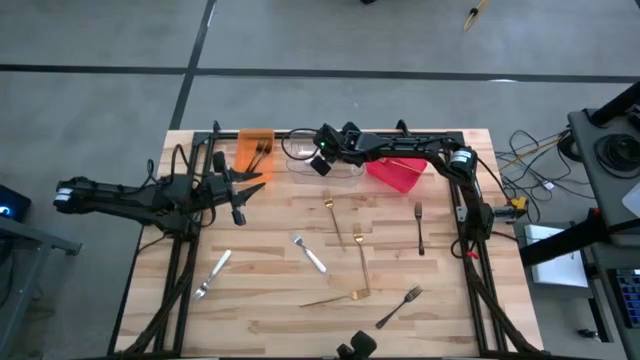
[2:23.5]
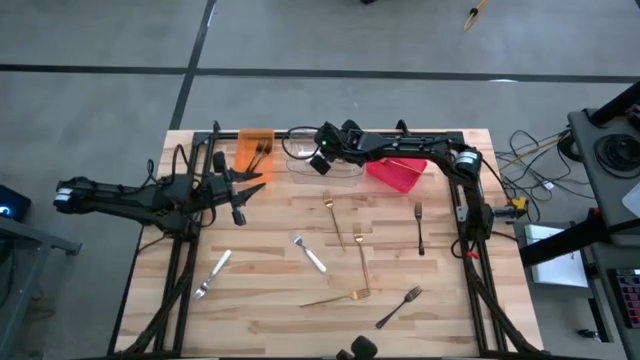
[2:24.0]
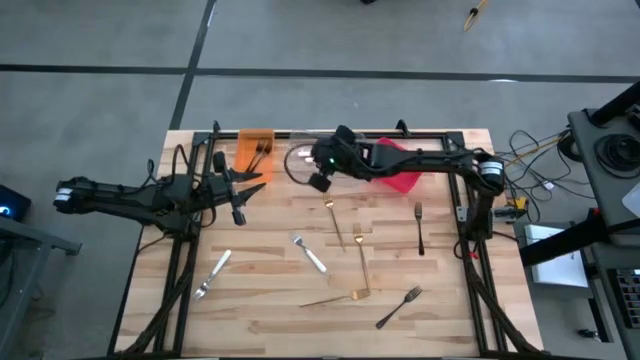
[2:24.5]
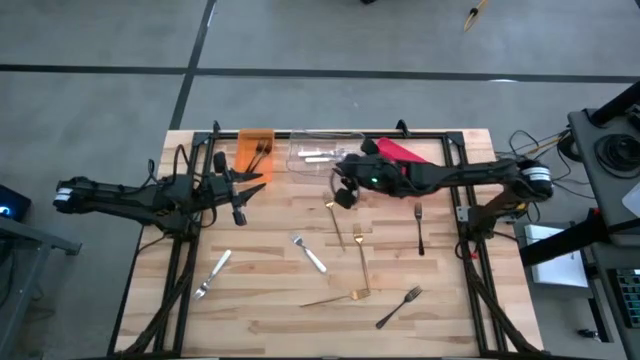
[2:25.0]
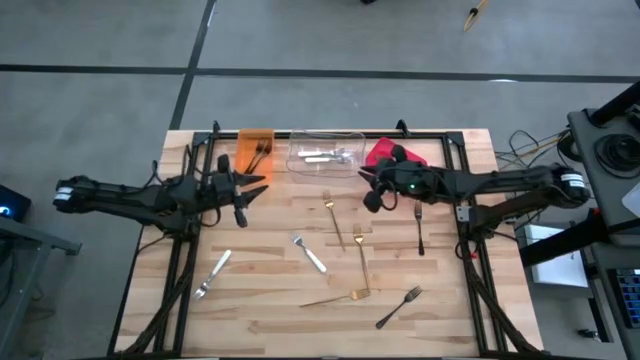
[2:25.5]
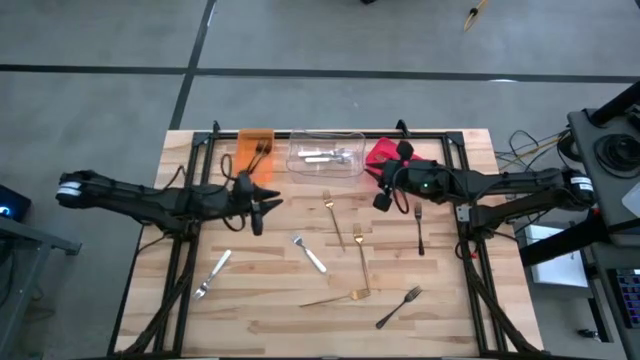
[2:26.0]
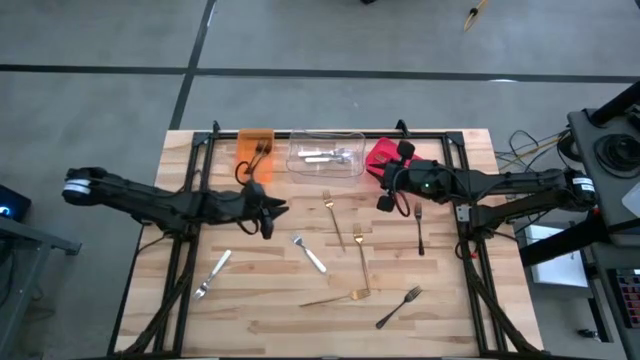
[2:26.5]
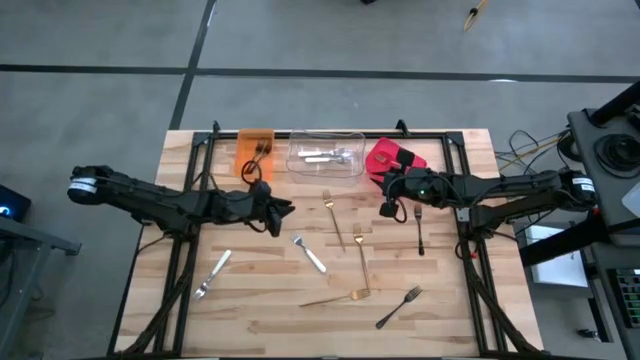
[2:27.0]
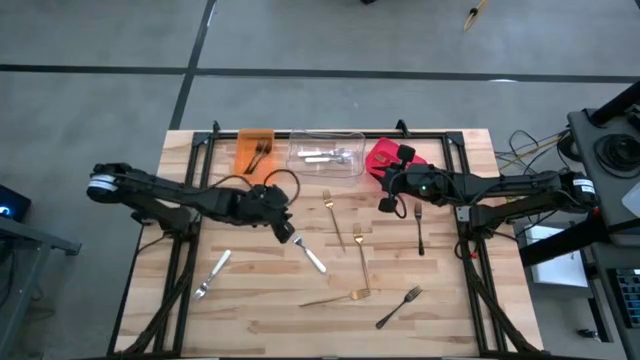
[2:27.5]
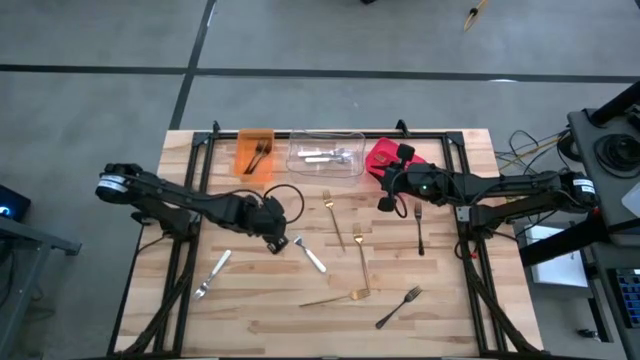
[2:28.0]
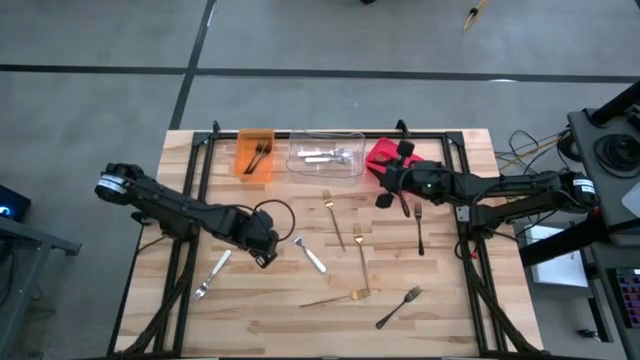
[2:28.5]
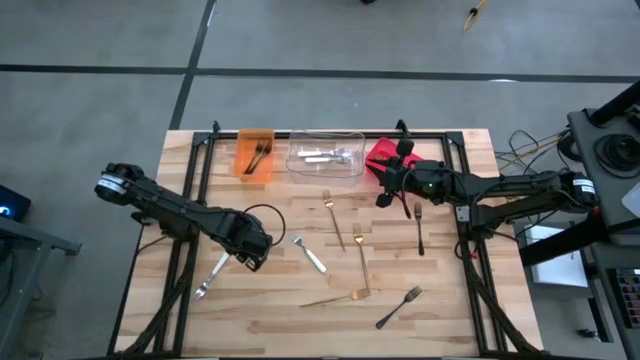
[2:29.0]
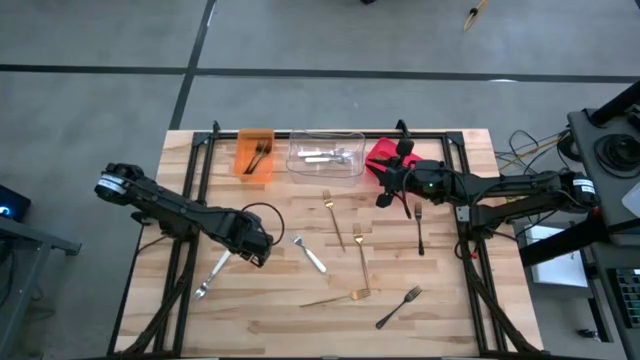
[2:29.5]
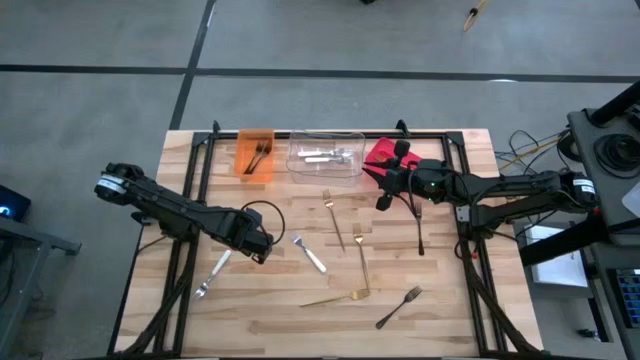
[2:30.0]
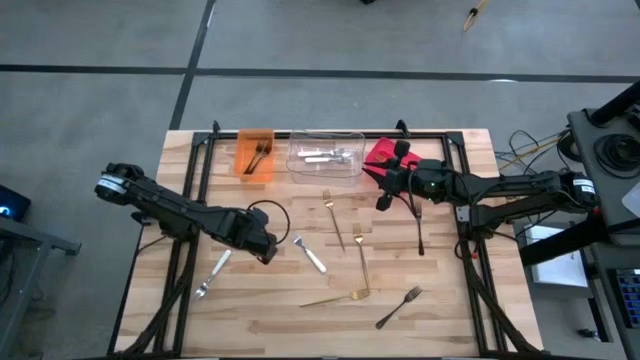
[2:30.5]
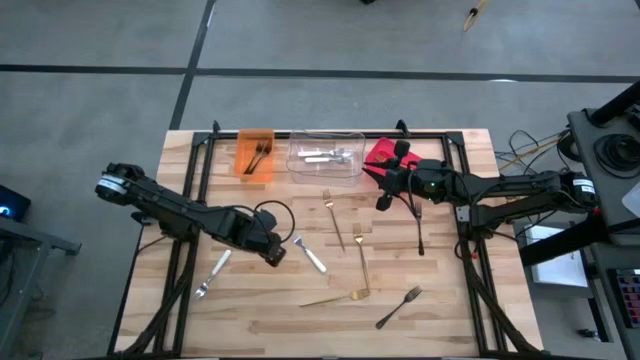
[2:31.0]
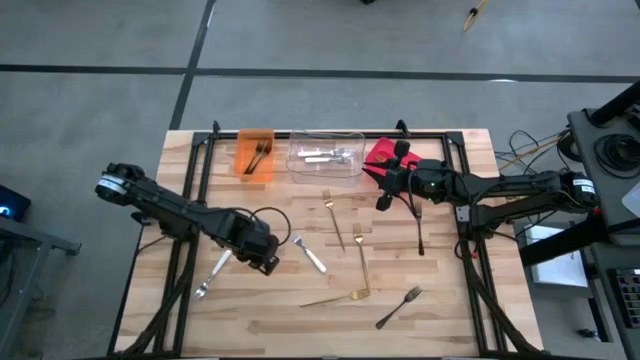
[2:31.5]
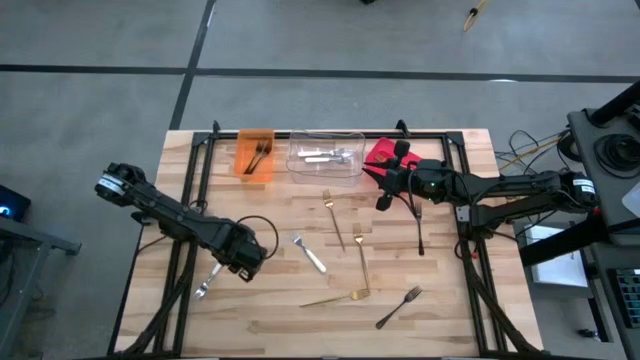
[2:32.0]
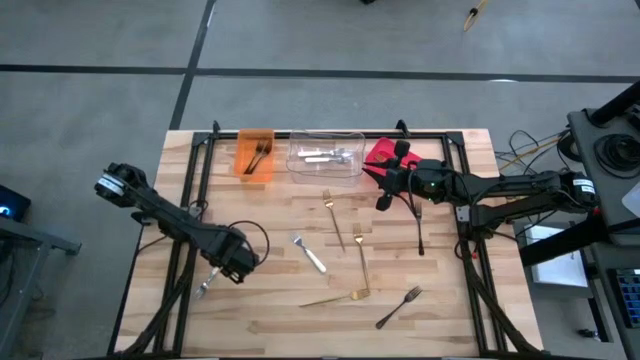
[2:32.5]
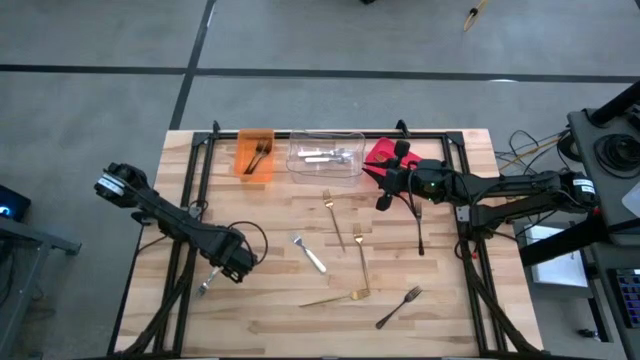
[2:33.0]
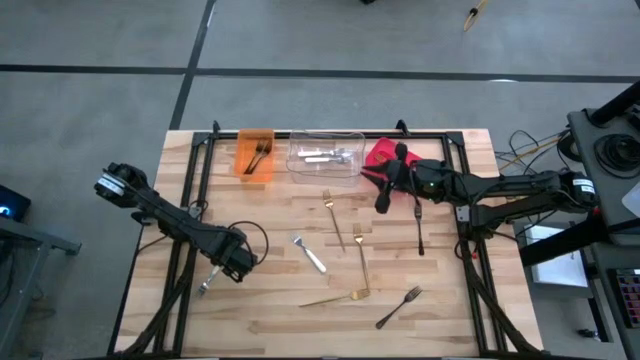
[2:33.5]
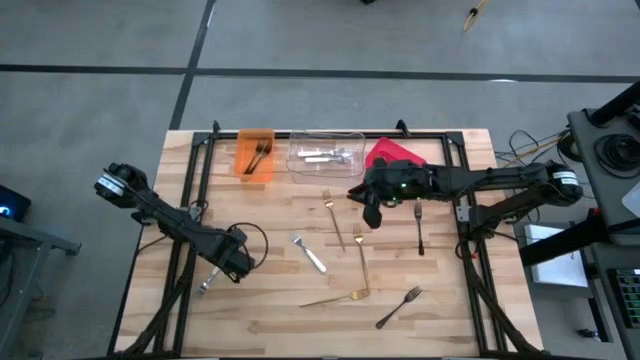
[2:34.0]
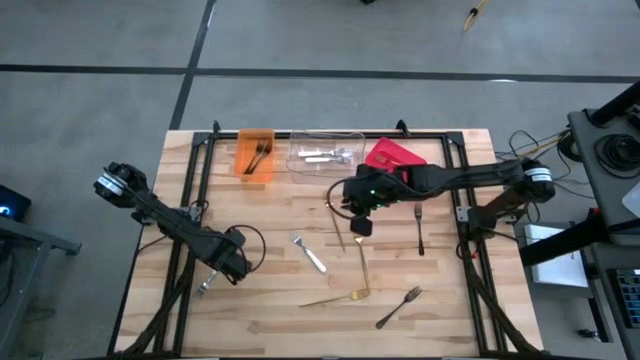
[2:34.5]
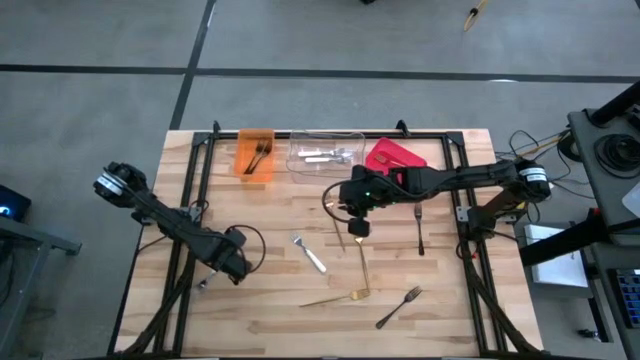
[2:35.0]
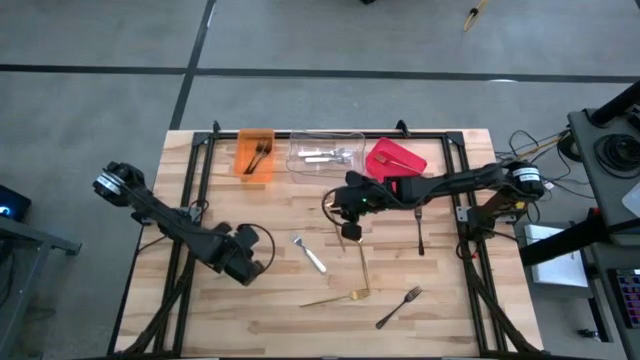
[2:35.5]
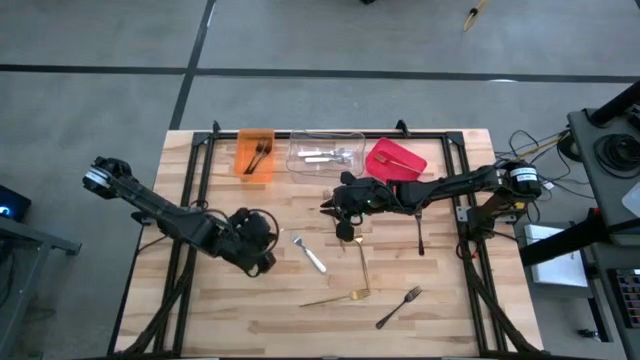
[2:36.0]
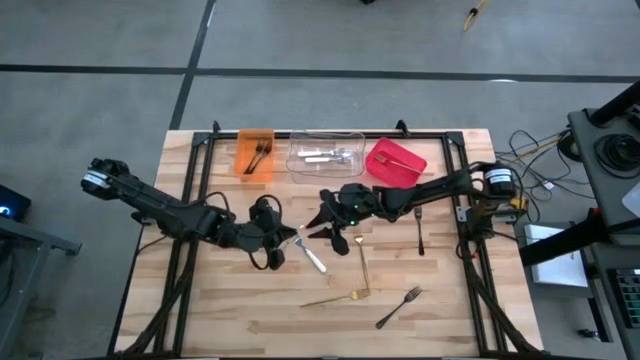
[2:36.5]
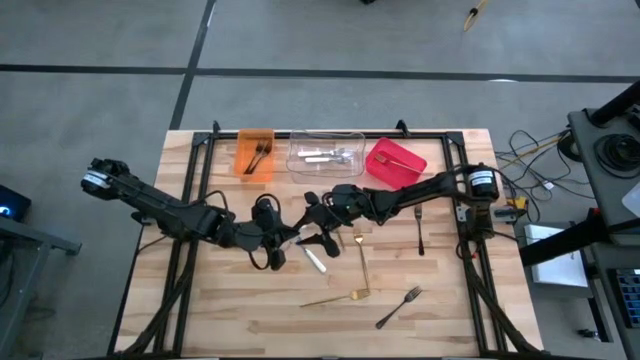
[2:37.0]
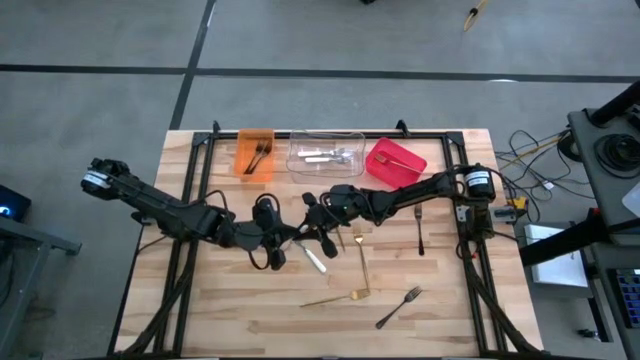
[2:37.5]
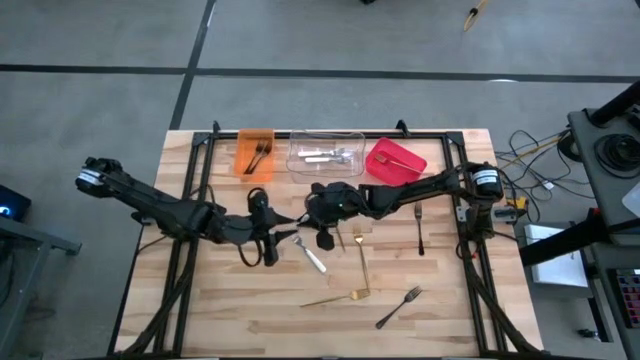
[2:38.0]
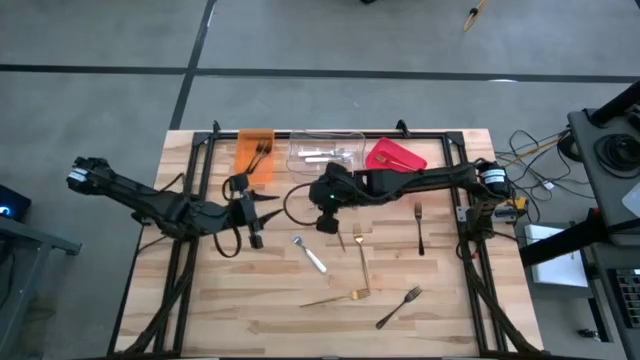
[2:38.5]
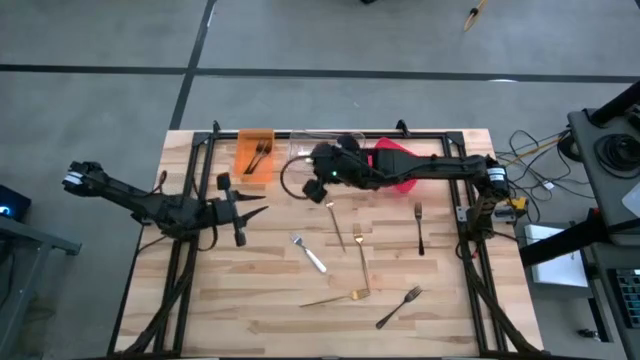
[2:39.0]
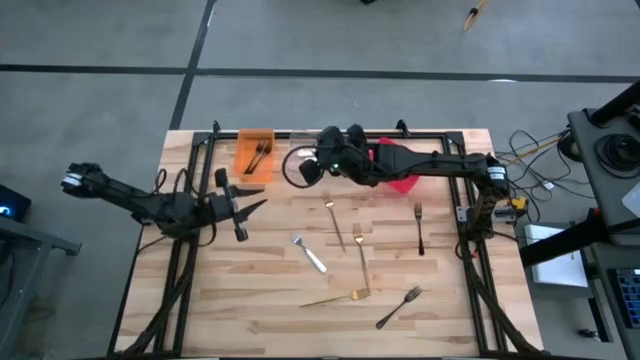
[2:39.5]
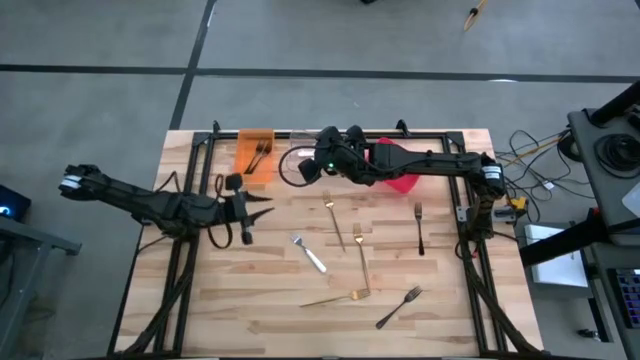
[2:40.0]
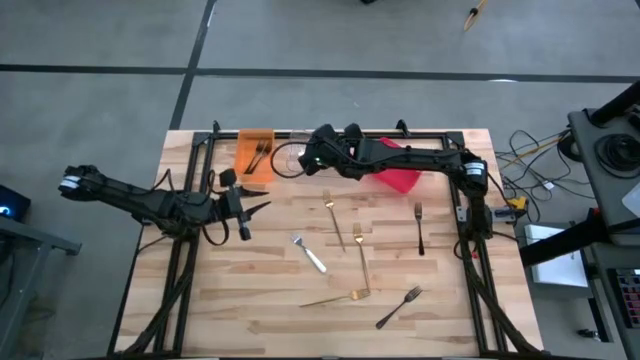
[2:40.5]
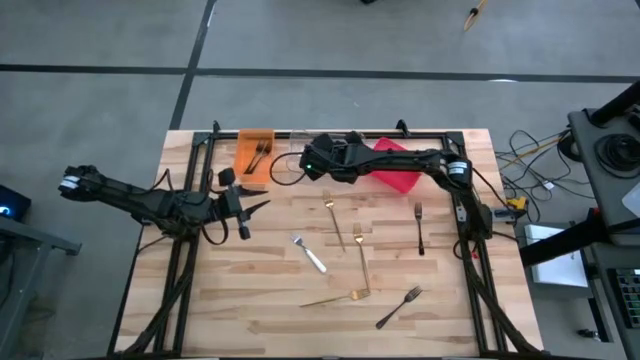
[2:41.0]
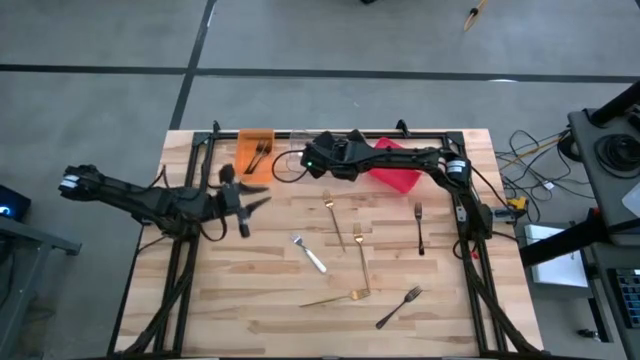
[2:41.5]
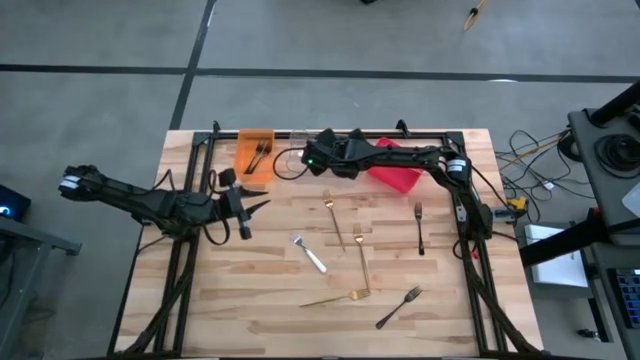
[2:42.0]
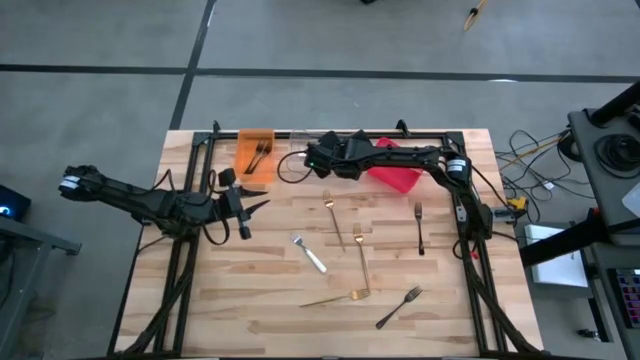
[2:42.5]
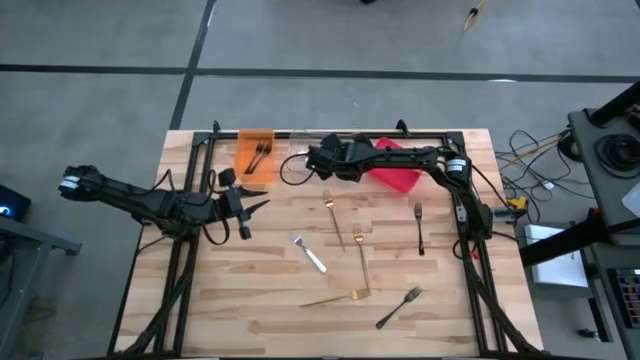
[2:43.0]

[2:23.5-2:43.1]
Task: Sort silverware by color (type)
Put the white fork into the transparent bin

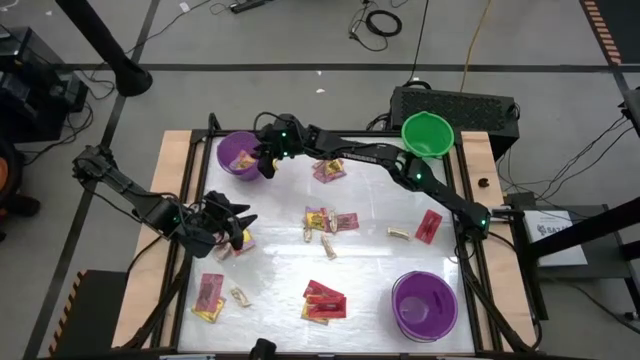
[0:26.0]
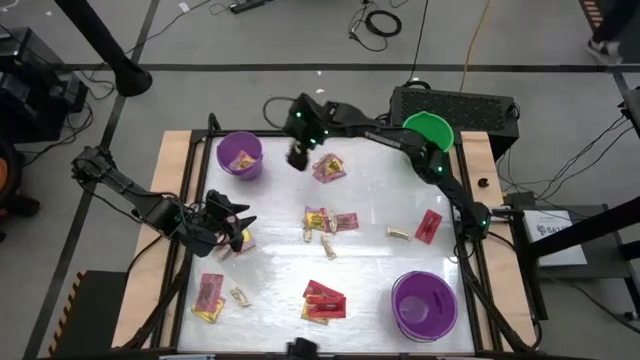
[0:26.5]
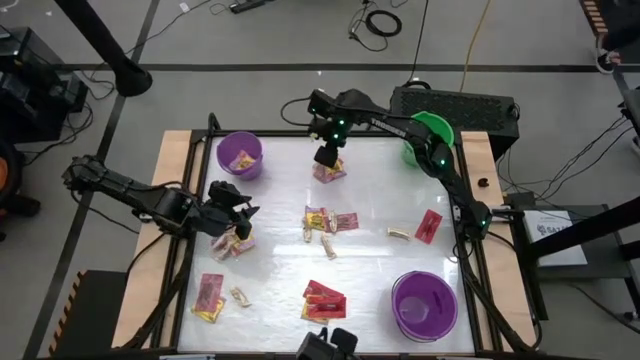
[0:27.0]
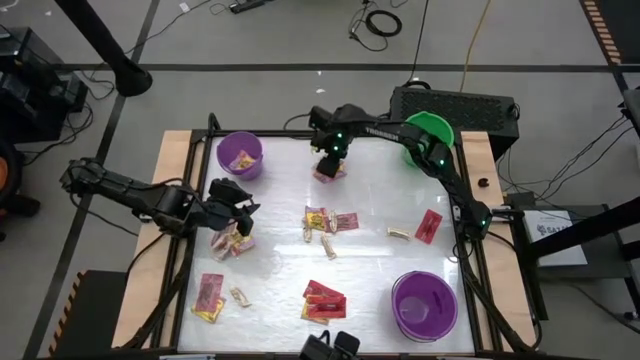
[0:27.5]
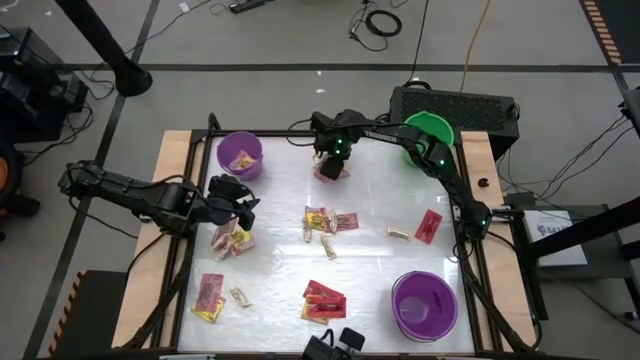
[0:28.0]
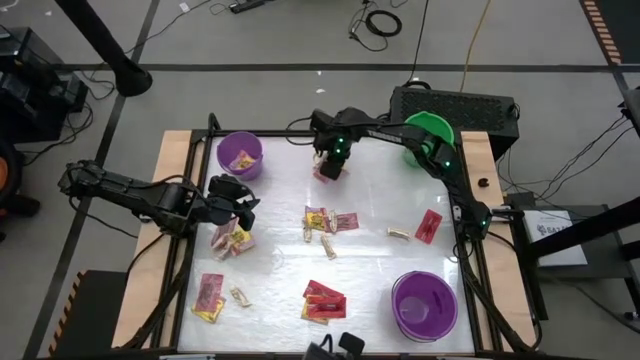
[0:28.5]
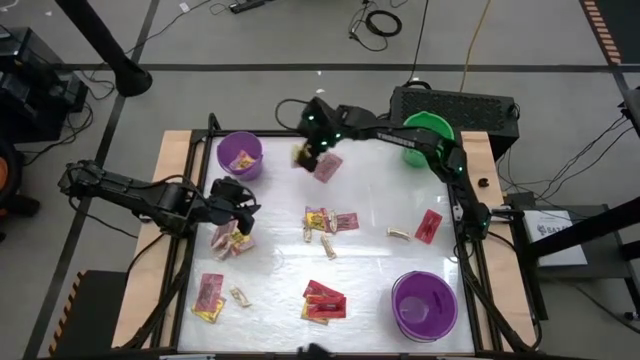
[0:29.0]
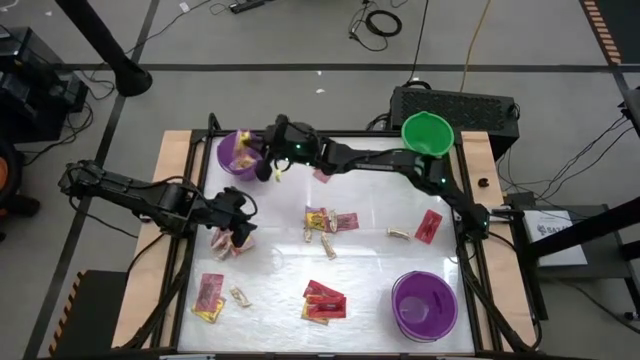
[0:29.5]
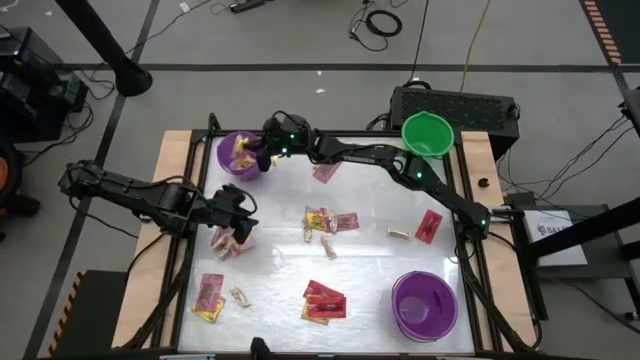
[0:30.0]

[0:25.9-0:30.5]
Task: Sort candy by brand, put in halloween buckets
Put the yellow candy into the top violet bucket
